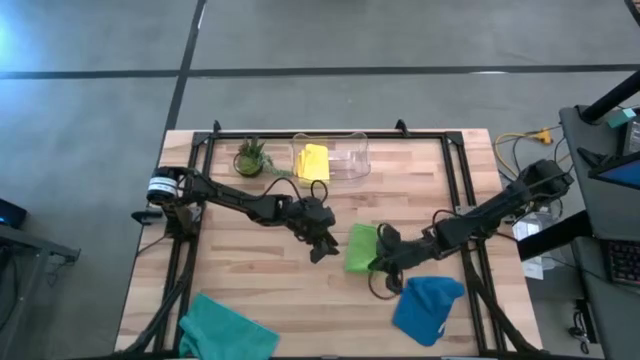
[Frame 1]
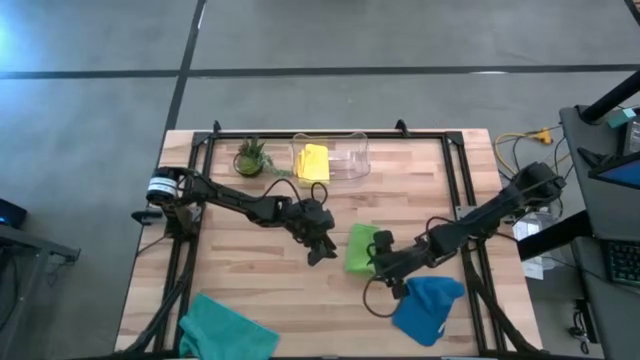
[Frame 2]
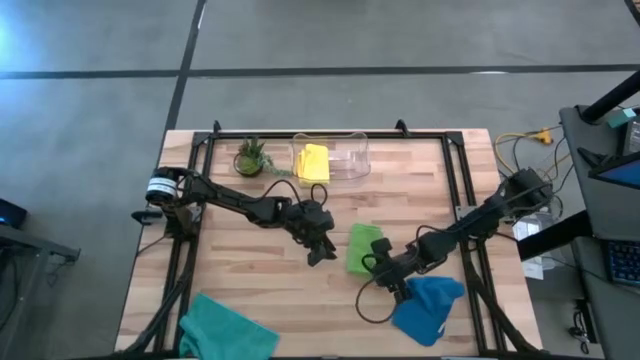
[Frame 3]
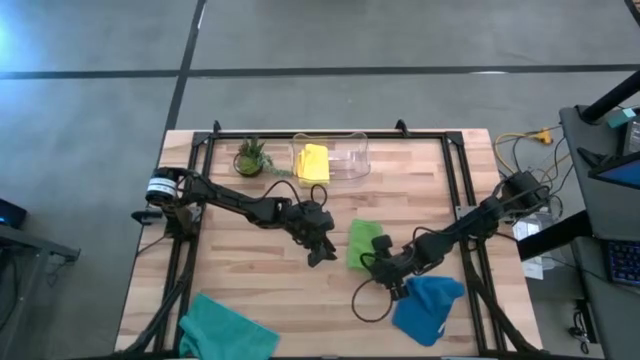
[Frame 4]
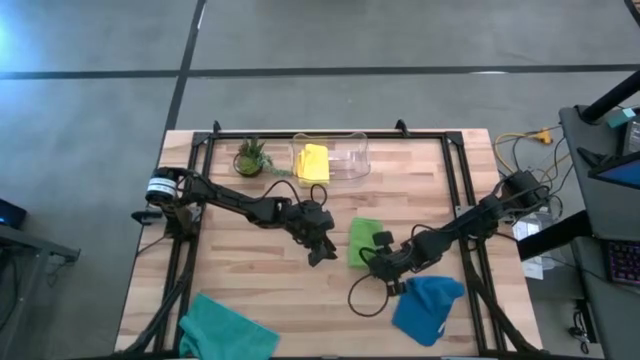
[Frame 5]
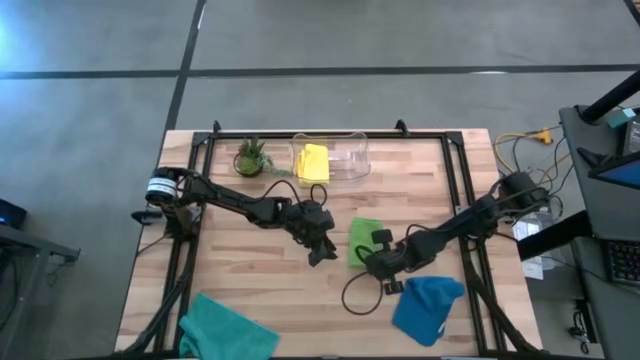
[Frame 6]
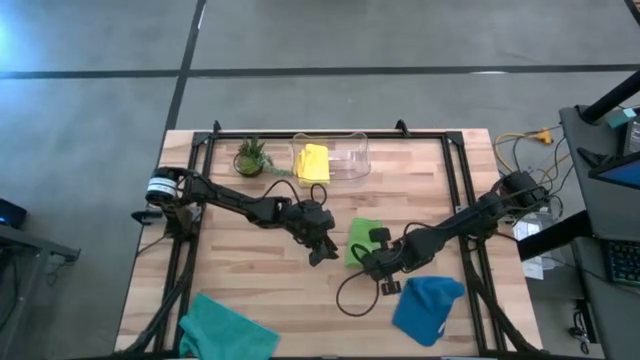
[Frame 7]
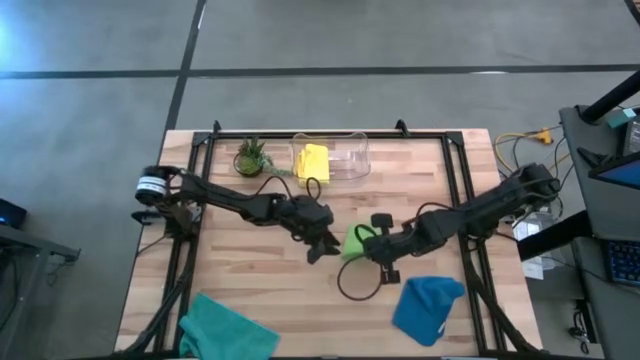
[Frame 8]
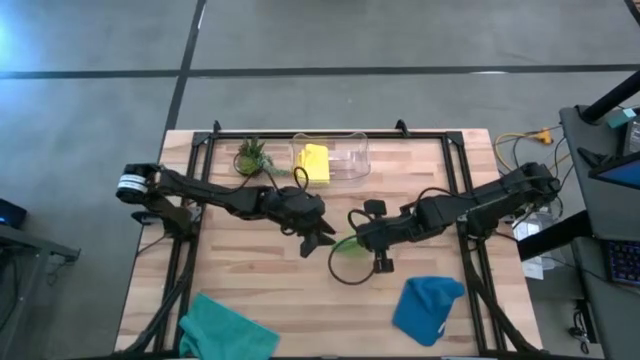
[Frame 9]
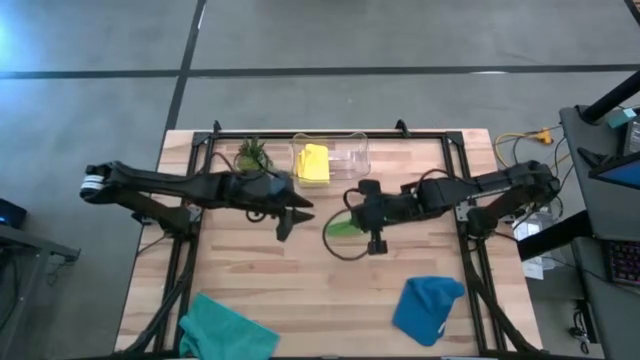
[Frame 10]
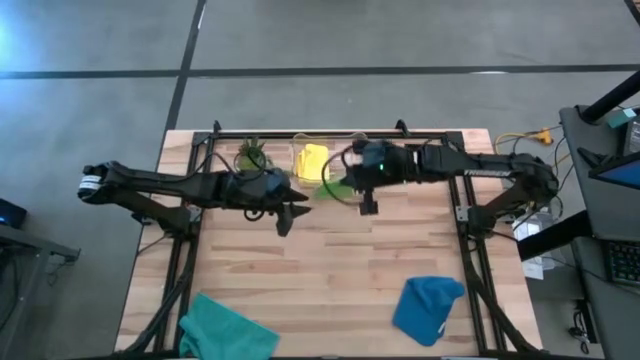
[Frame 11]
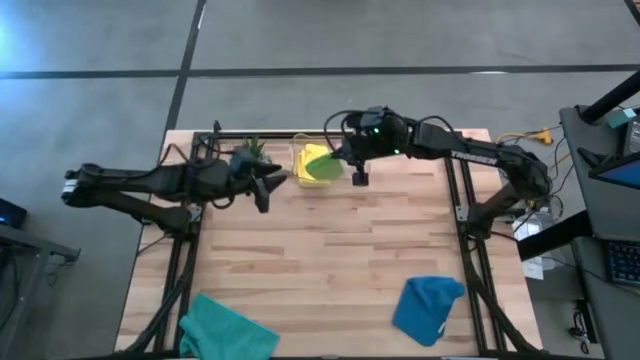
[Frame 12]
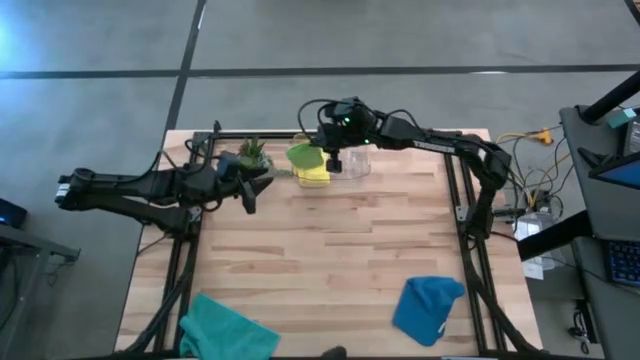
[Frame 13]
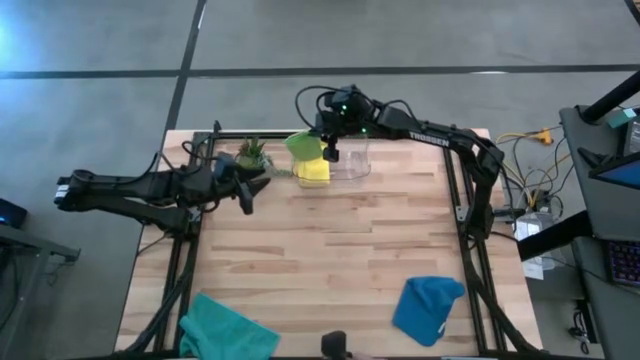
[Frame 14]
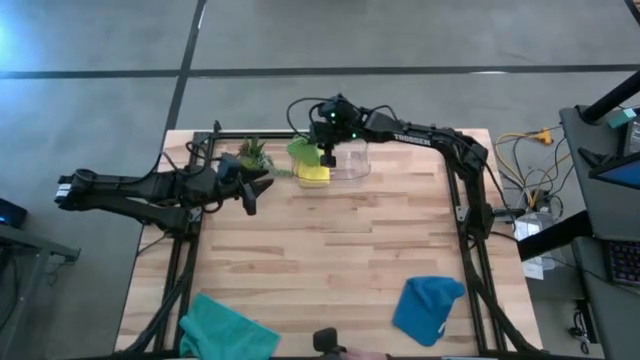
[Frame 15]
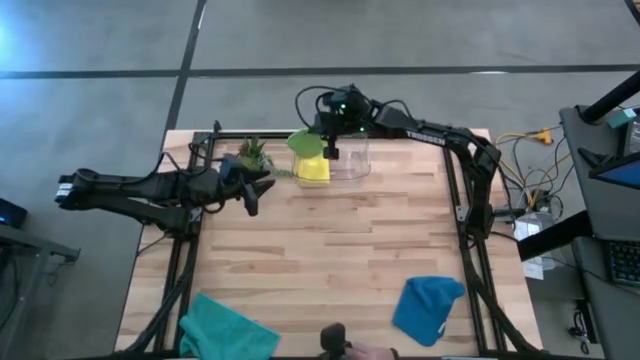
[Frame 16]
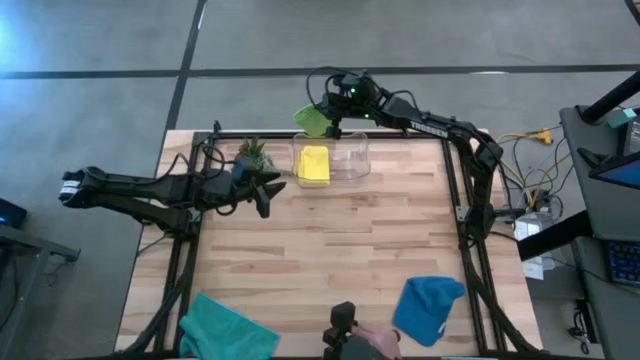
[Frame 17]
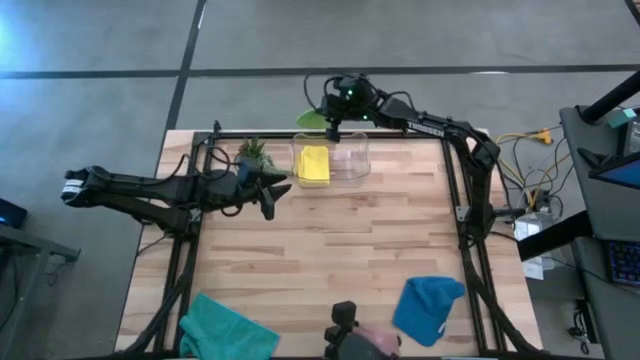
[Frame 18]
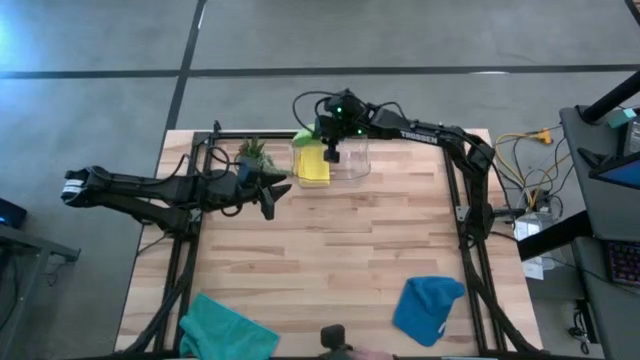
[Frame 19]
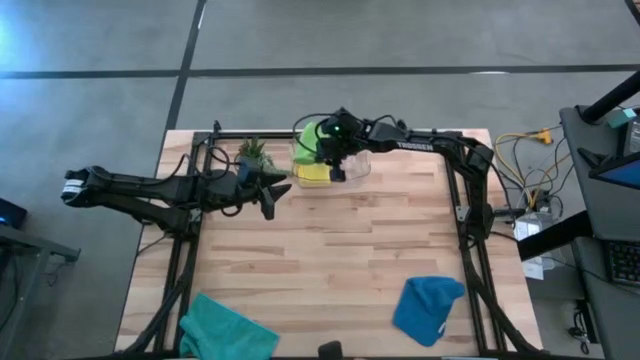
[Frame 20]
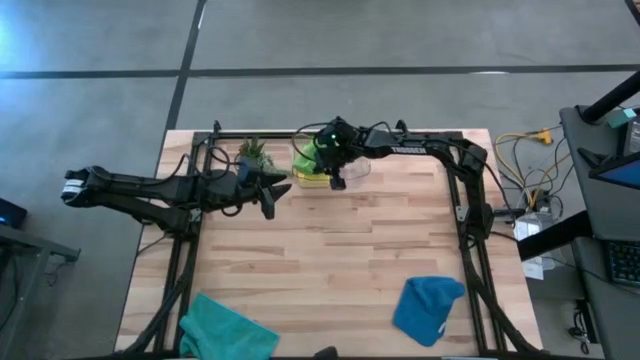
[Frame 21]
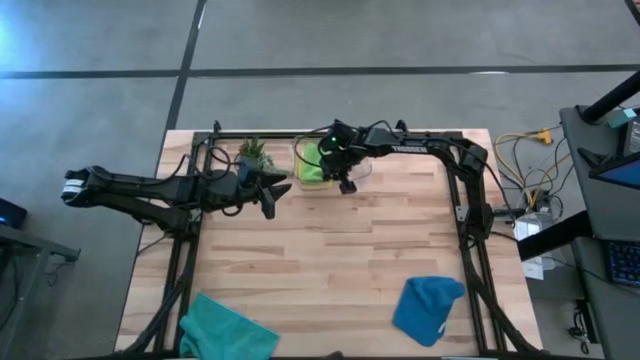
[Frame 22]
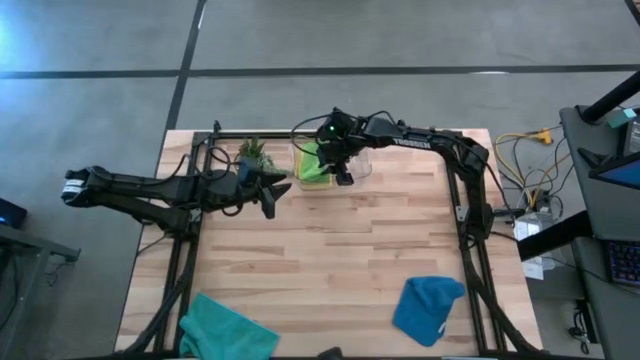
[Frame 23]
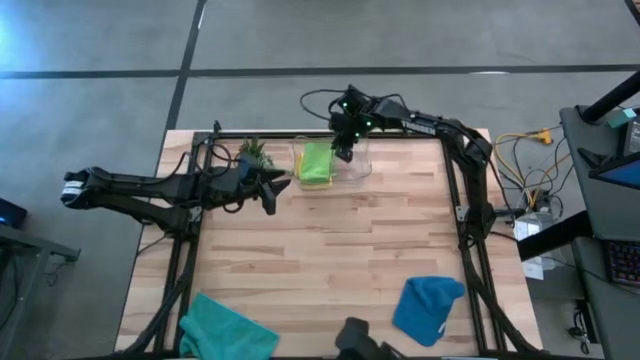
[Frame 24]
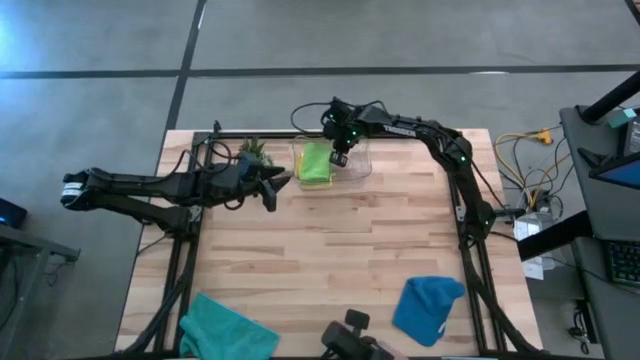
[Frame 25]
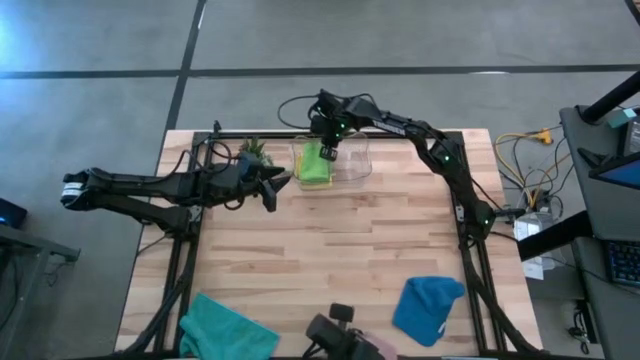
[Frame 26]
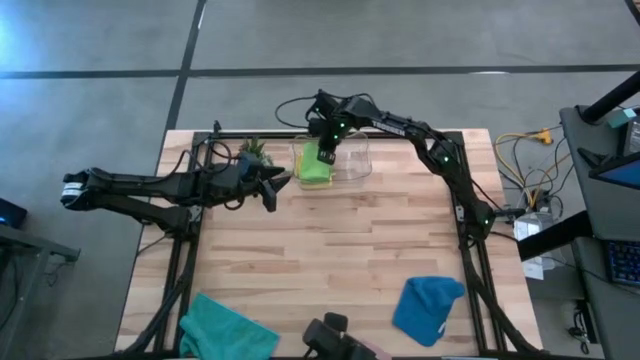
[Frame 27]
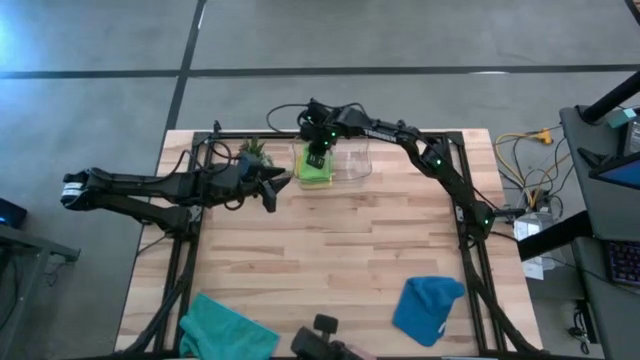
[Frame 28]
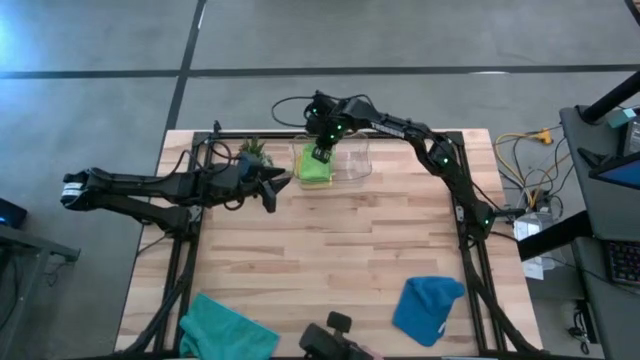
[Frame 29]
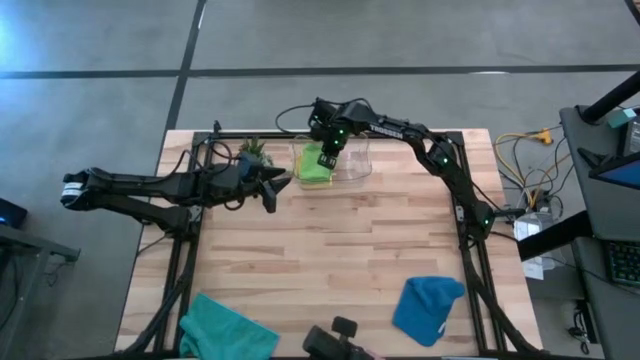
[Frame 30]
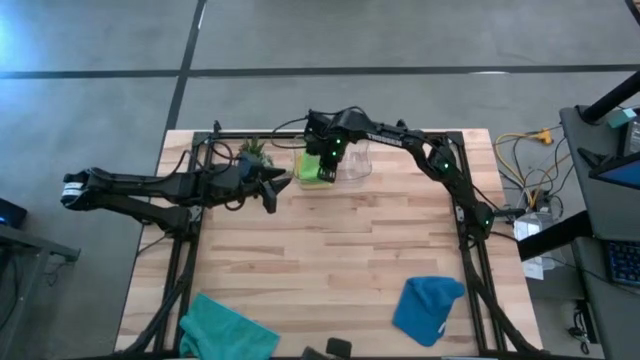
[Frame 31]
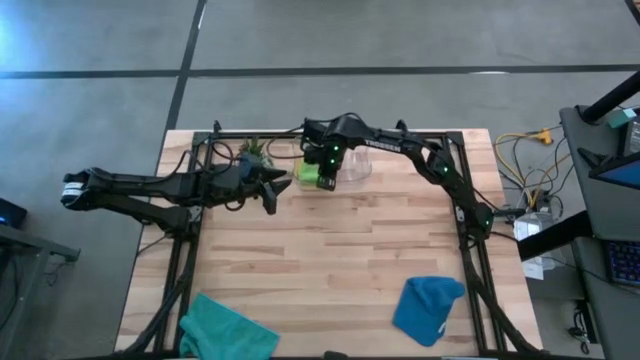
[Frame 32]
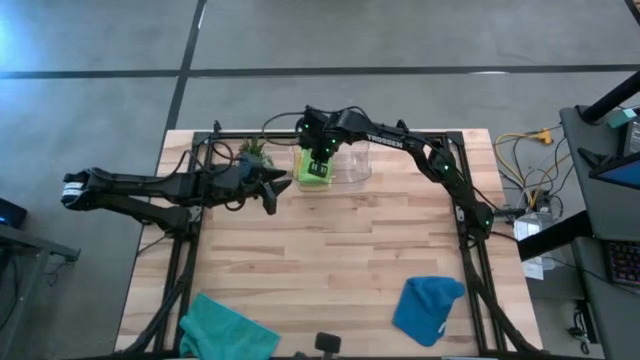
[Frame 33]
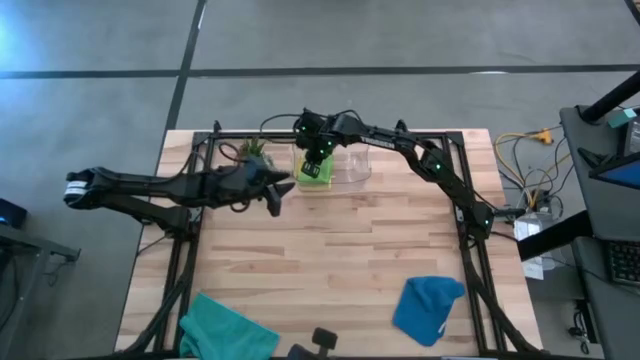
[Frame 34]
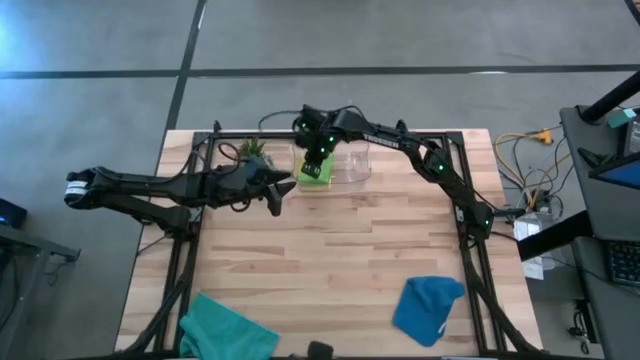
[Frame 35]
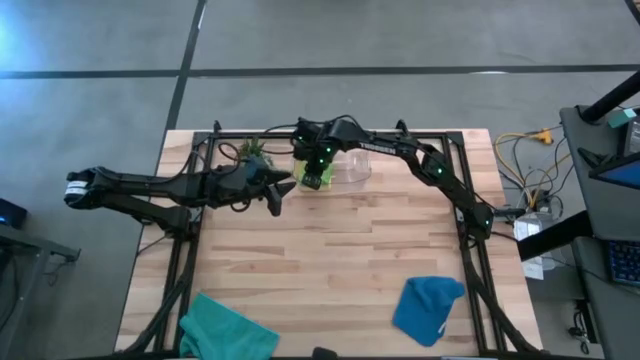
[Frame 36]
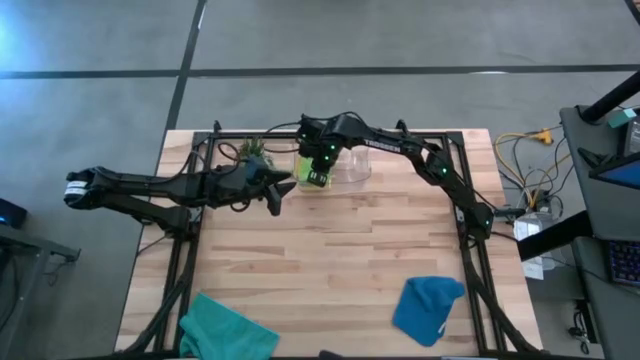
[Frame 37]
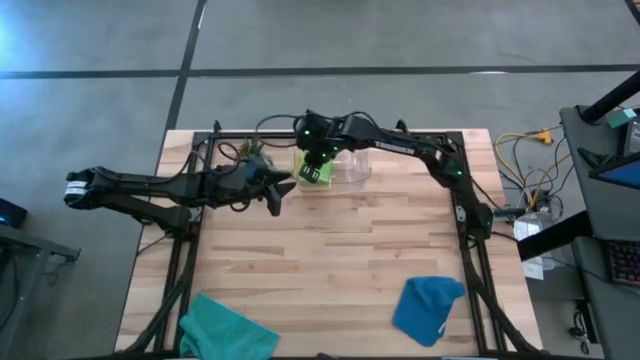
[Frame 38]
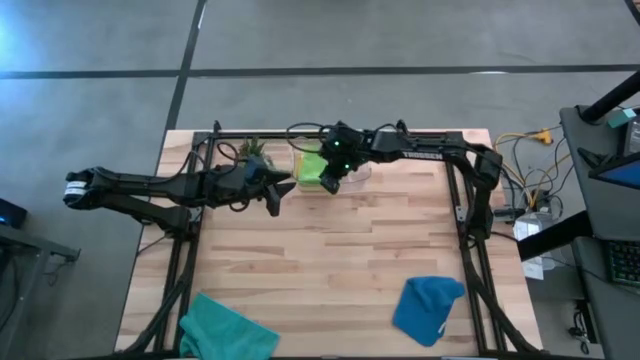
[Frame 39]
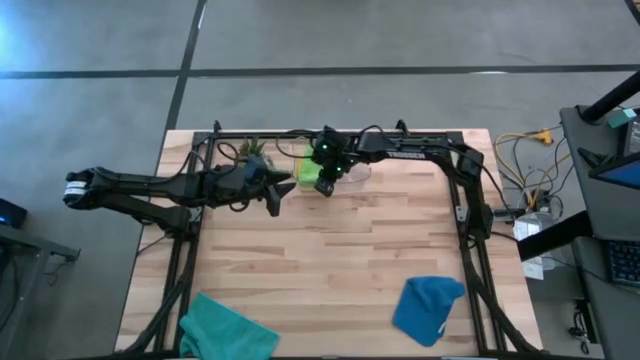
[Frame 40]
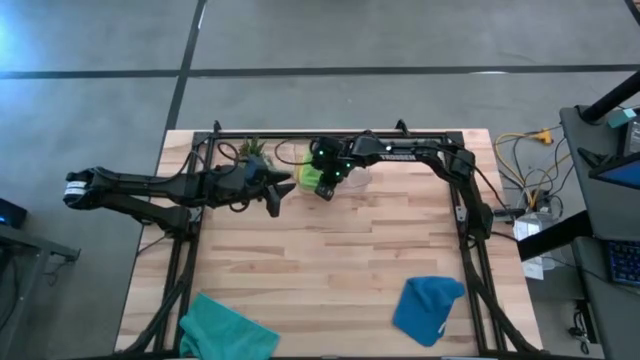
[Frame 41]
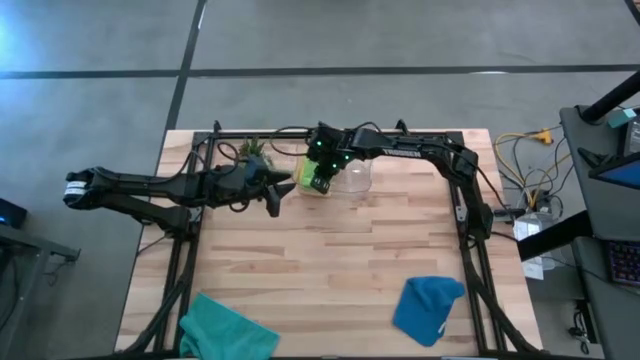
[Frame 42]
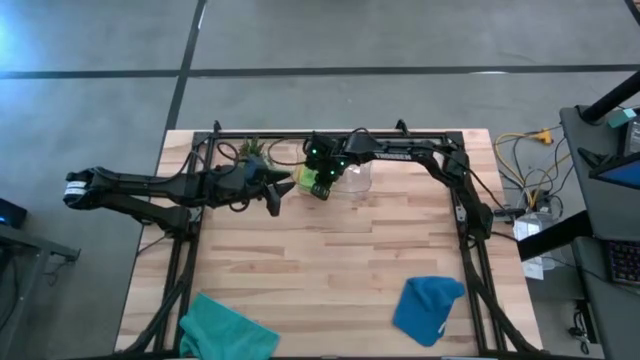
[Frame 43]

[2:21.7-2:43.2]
Task: Fold microfiber towels
Put the green microfiber towel in the transparent bin
